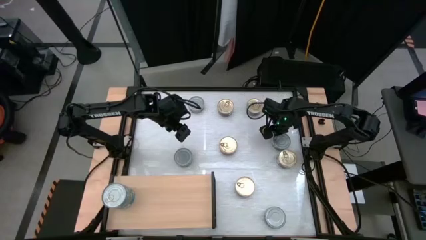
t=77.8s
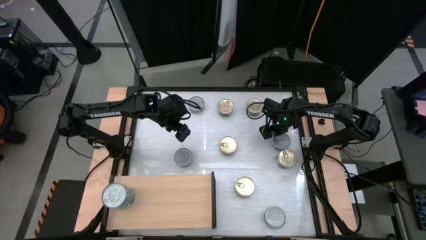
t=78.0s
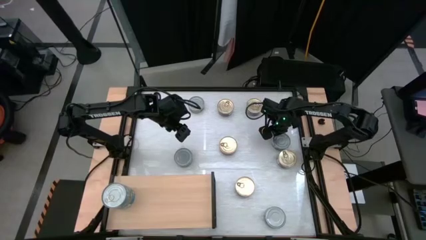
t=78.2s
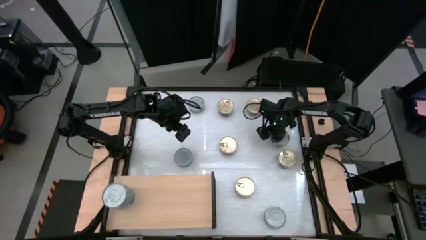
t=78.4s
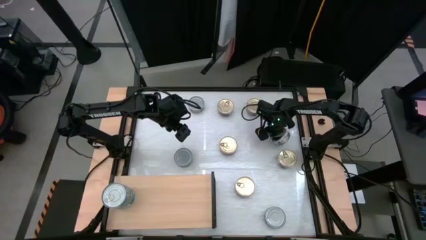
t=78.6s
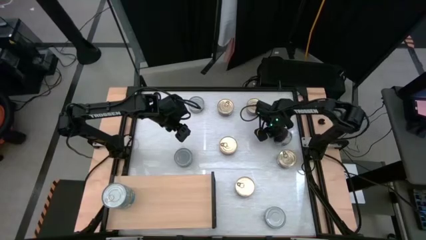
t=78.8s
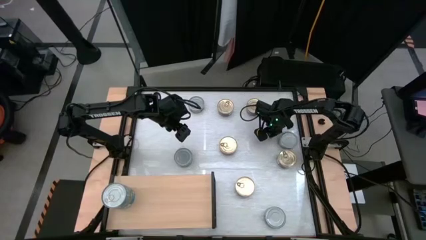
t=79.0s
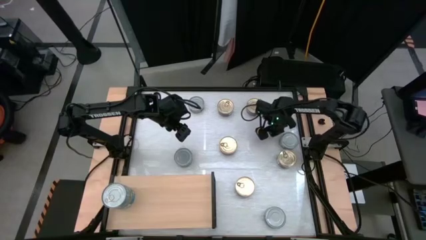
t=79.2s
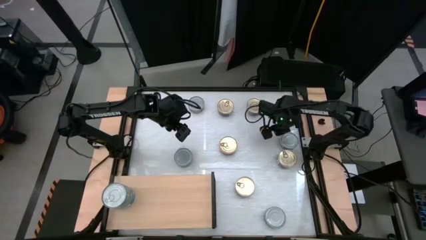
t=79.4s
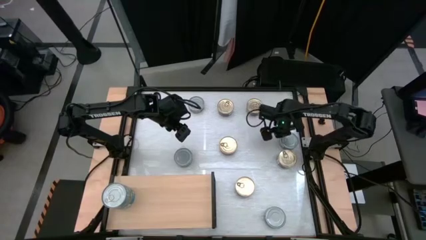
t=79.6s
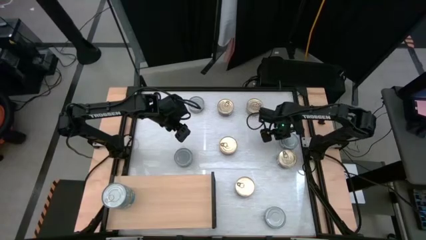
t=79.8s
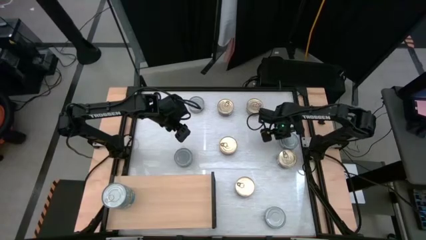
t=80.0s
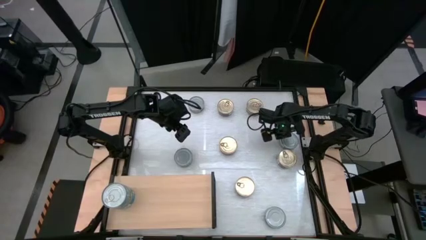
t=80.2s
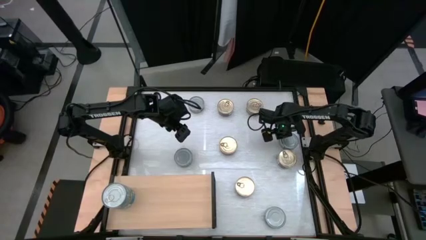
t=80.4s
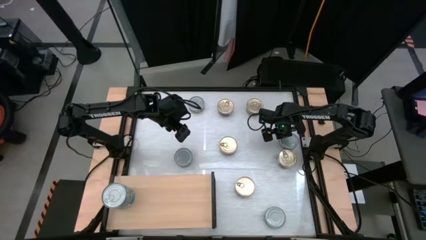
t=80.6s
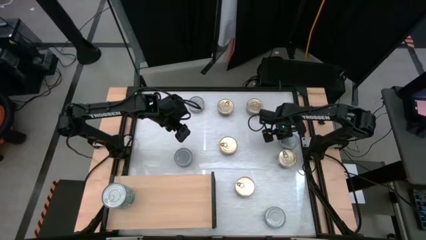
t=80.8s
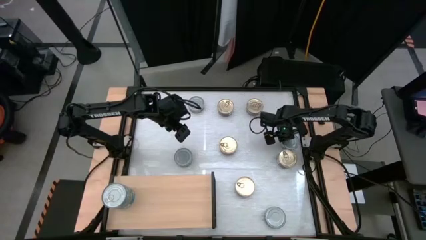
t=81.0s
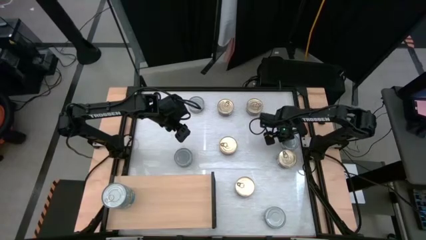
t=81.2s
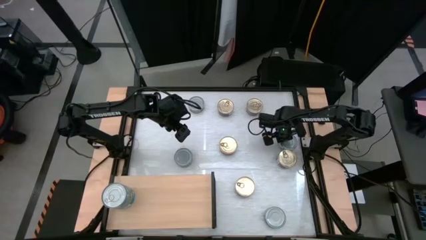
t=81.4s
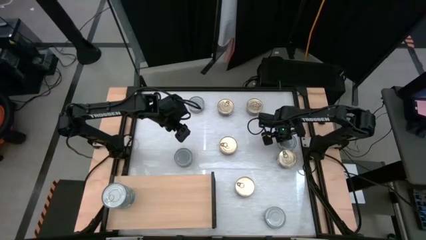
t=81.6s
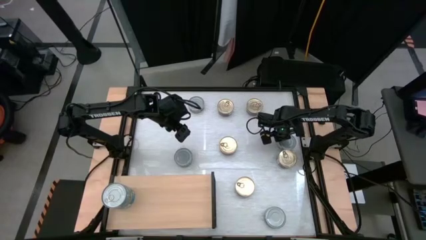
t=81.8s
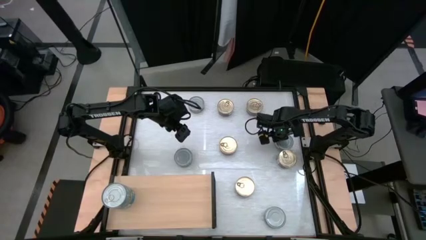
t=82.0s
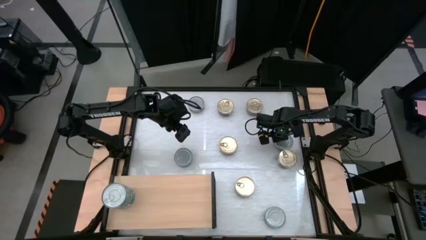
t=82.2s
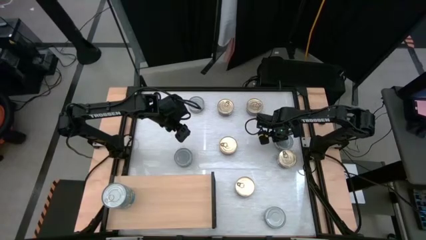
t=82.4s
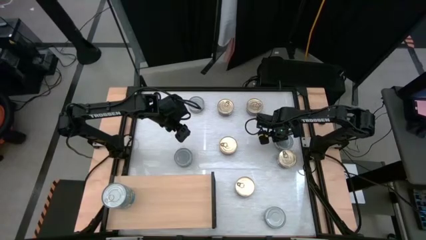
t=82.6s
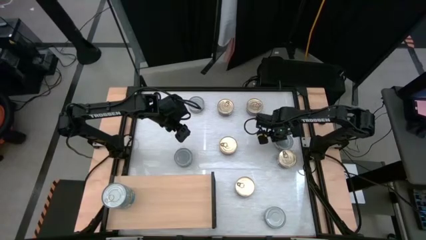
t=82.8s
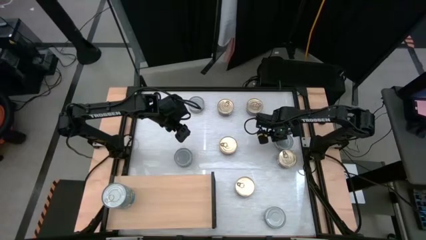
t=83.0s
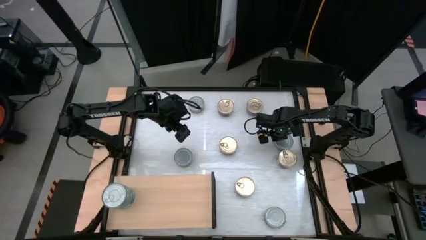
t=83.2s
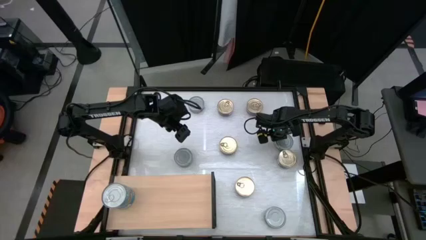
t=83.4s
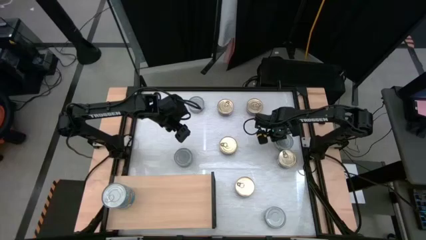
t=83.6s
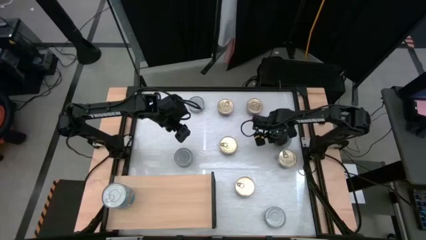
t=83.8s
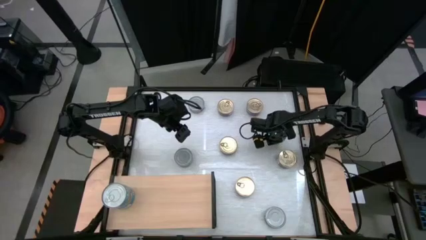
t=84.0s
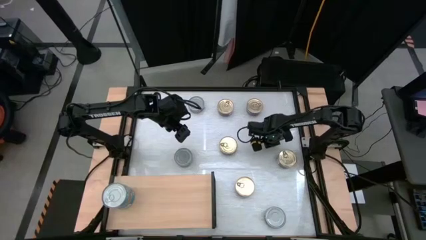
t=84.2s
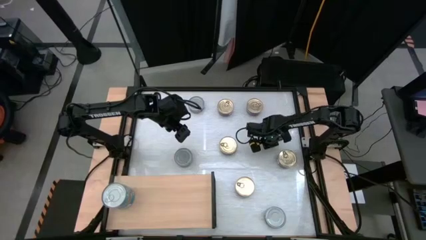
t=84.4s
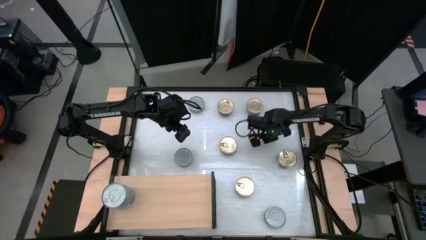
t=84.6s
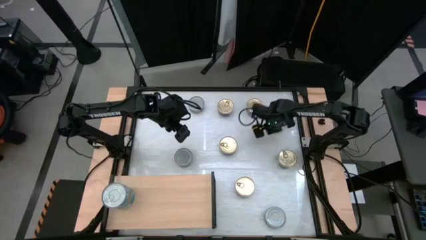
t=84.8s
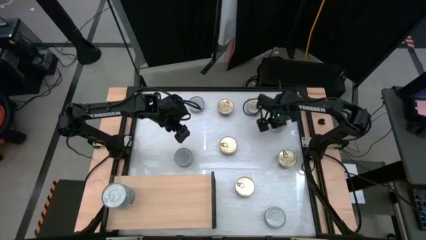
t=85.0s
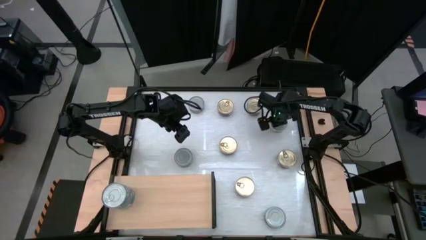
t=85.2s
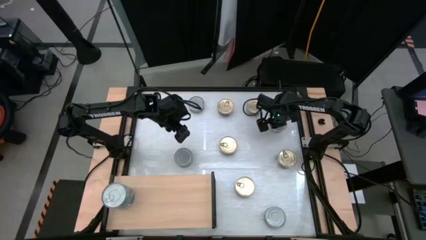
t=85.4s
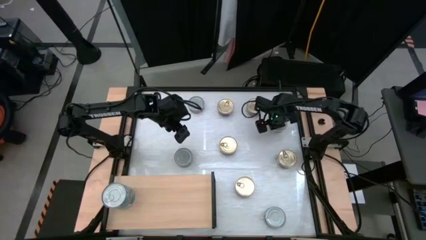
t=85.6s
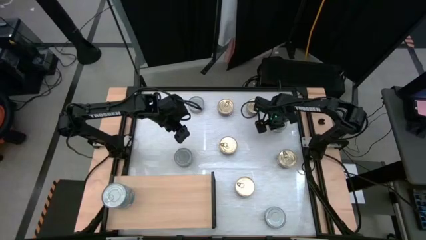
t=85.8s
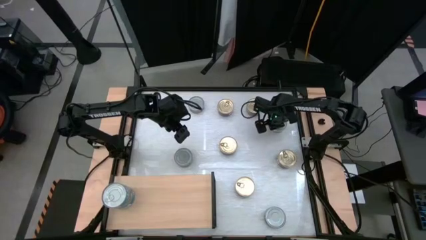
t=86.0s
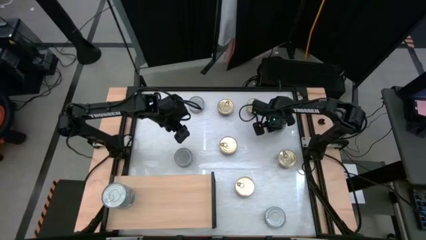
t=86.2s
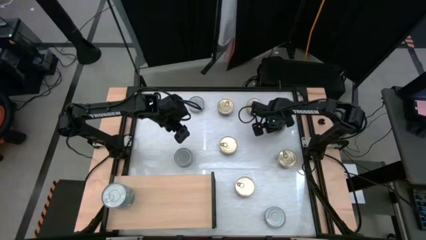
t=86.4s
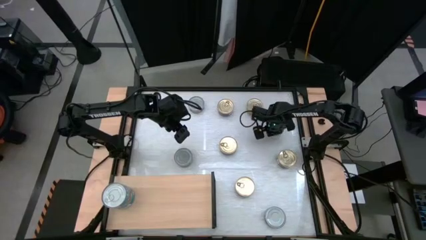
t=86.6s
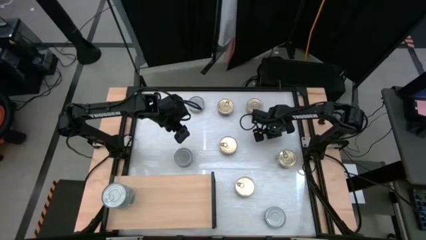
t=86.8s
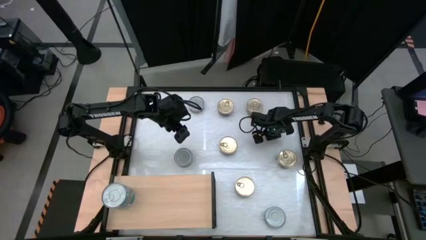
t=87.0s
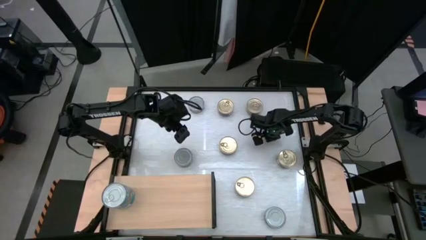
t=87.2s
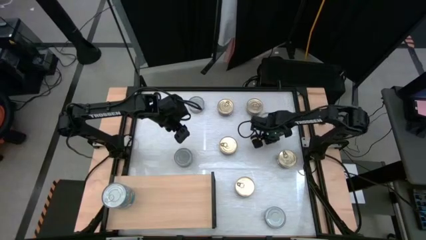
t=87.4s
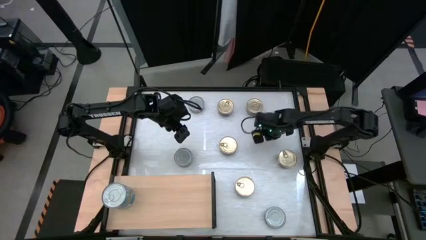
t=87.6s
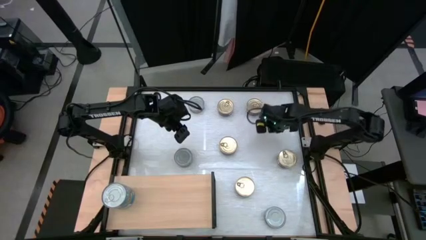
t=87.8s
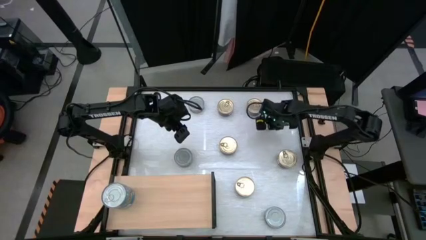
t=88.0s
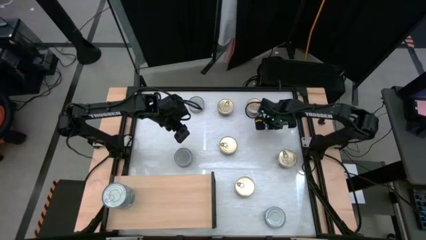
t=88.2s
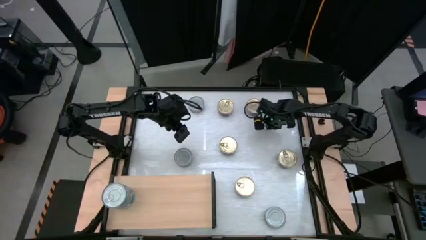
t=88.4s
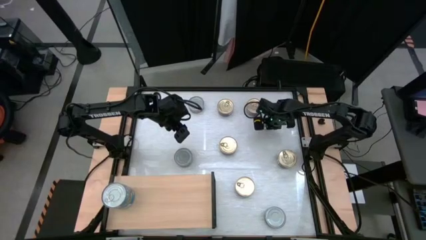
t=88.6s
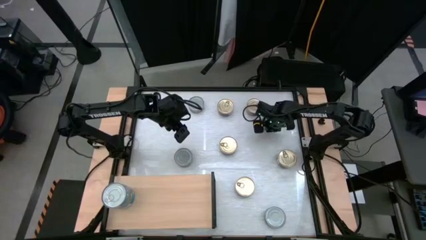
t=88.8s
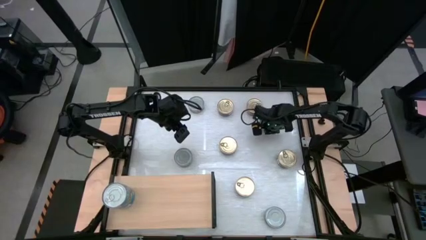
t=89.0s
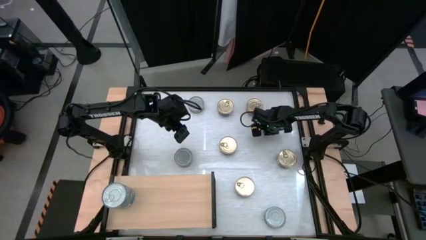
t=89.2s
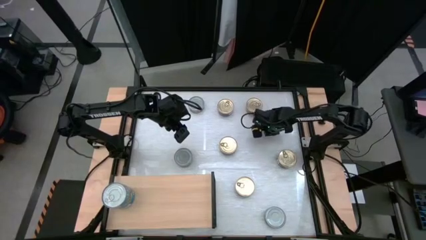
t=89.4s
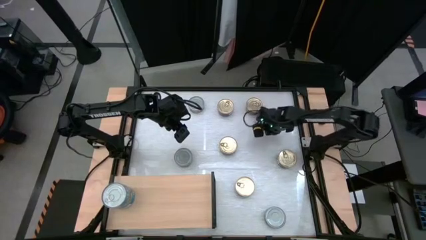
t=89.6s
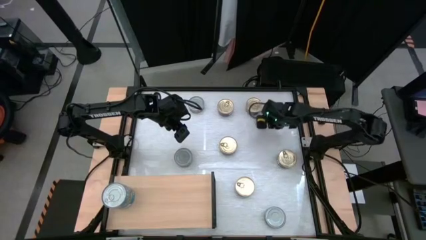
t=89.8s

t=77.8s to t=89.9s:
Task: Stack canned seafood by type on shelf
Put the green tuna can on the shelf
